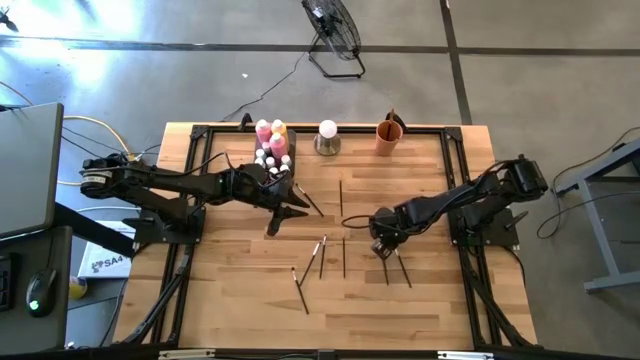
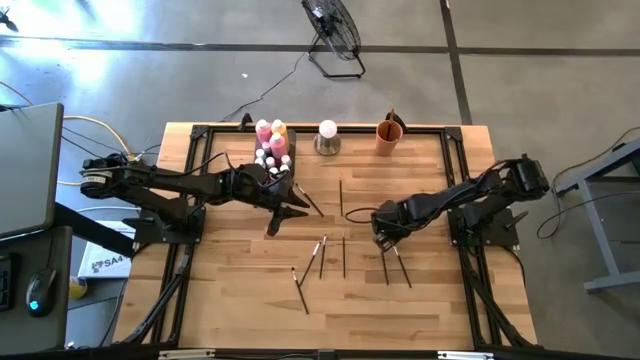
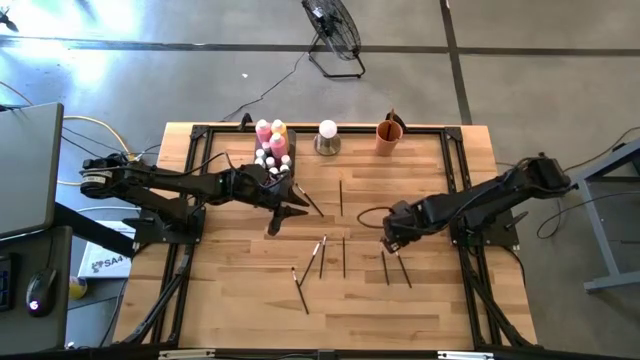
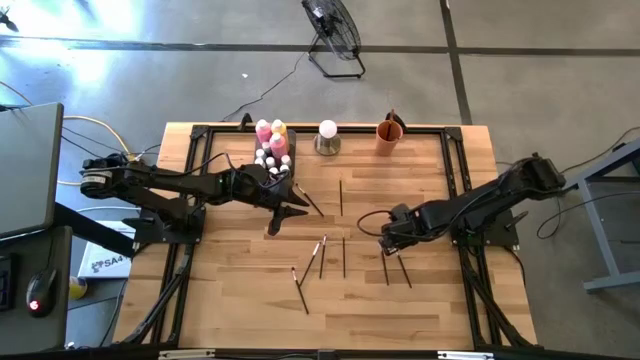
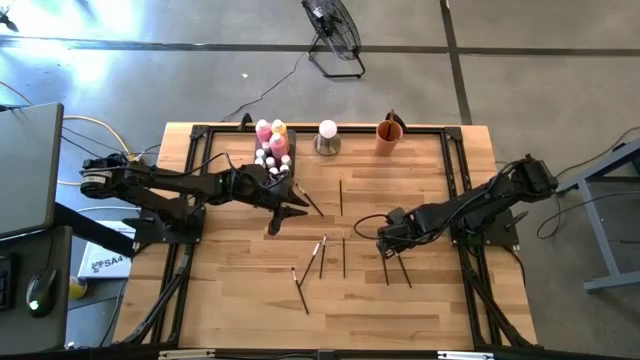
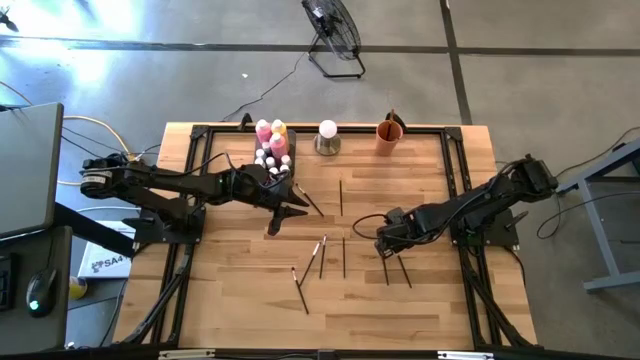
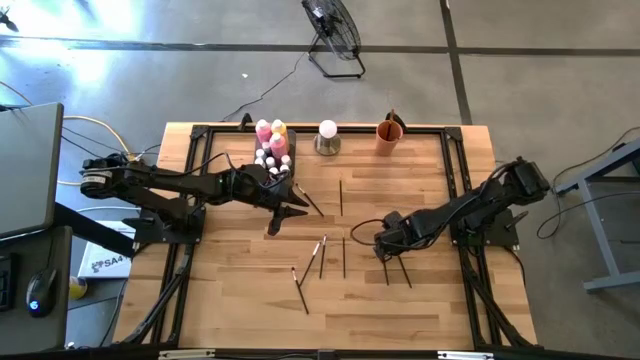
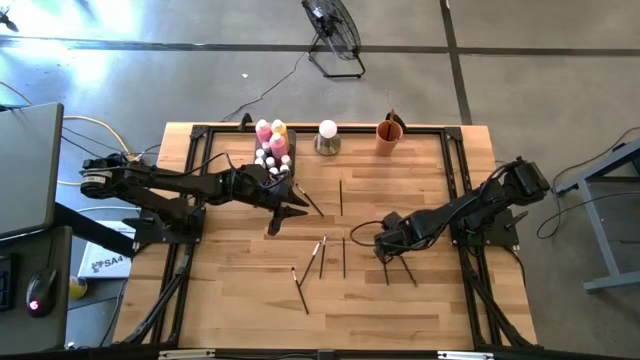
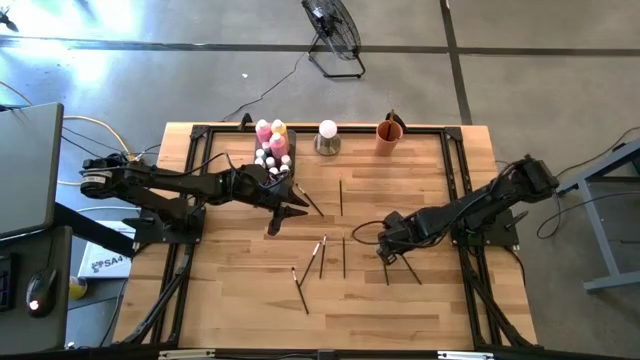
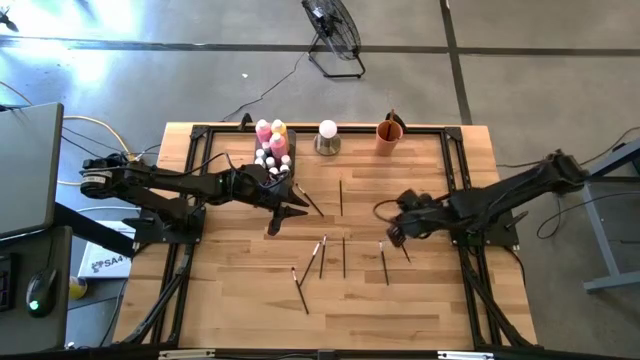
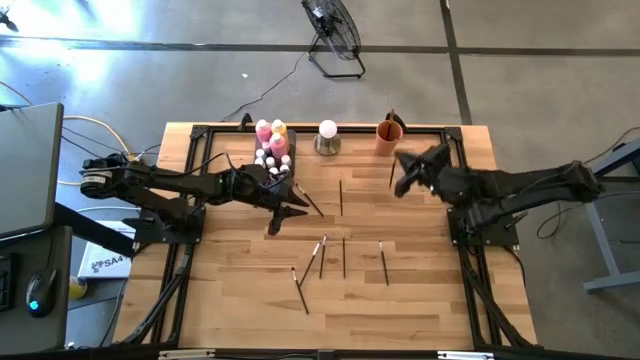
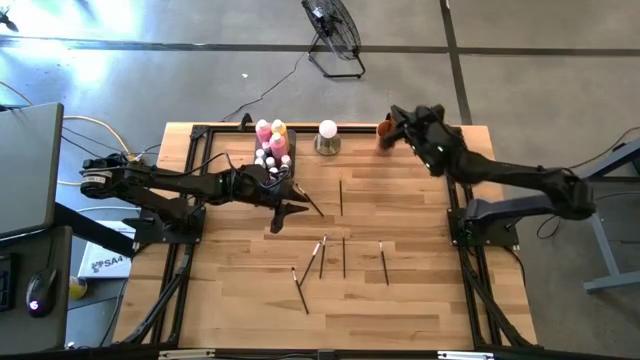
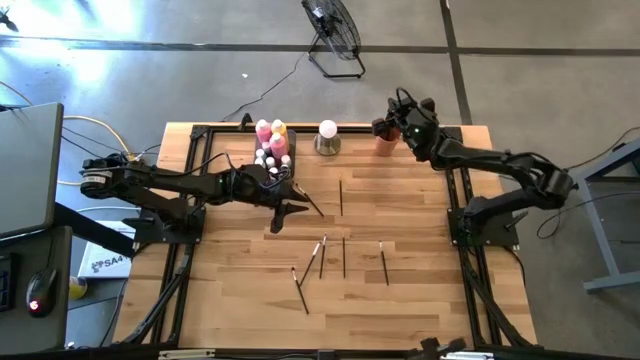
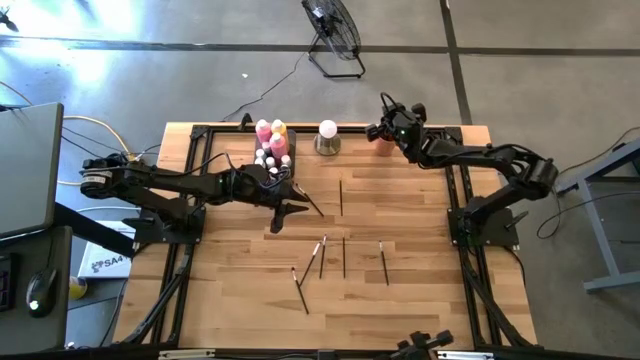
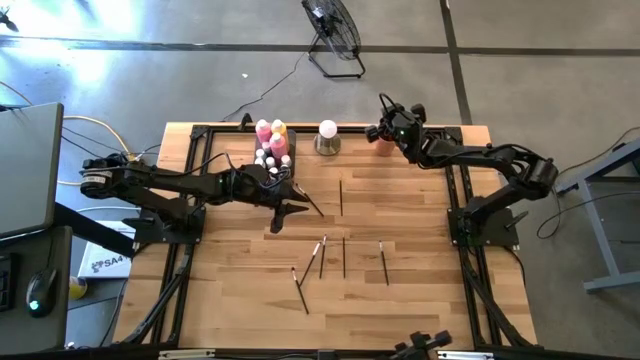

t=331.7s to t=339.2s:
Task: Pick & Place Paint Supplies
Put the silver paintbrush into the orange cup

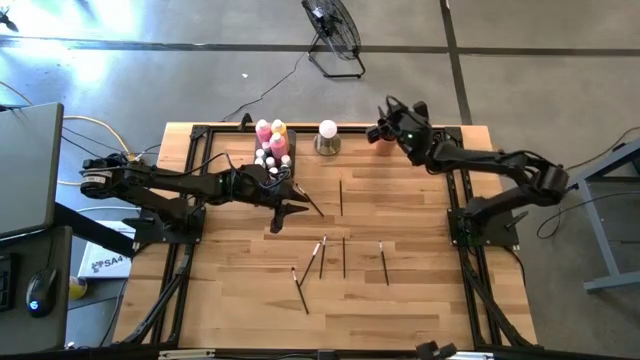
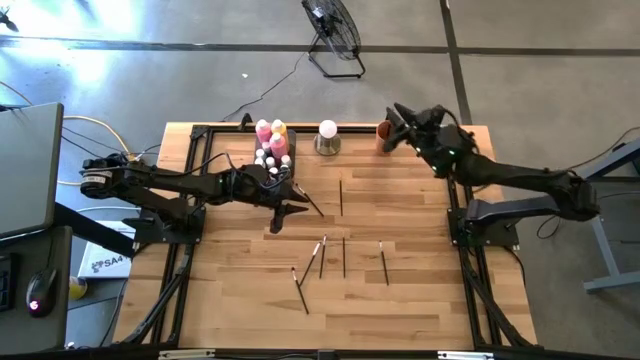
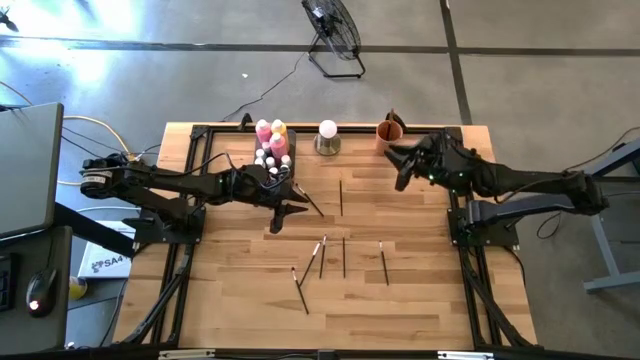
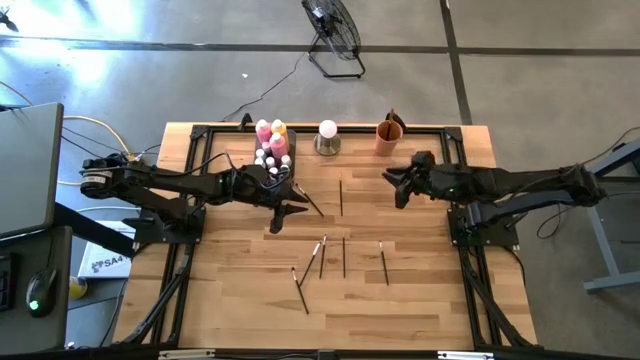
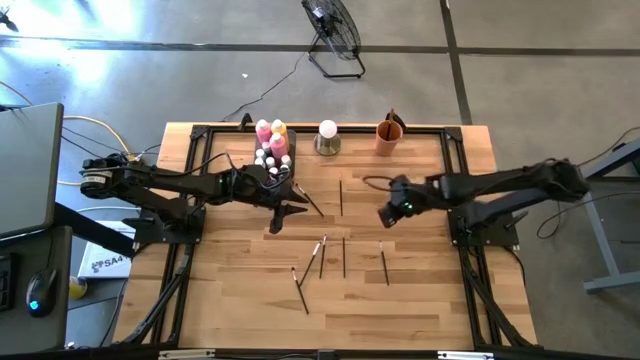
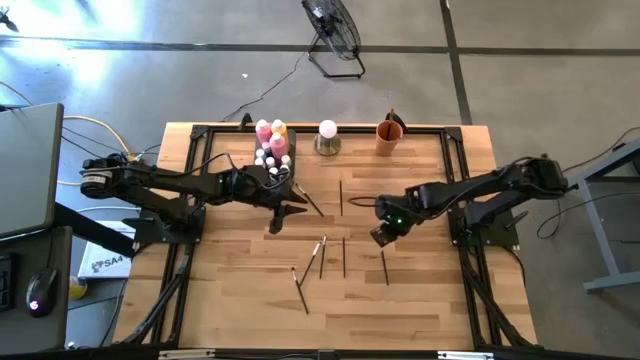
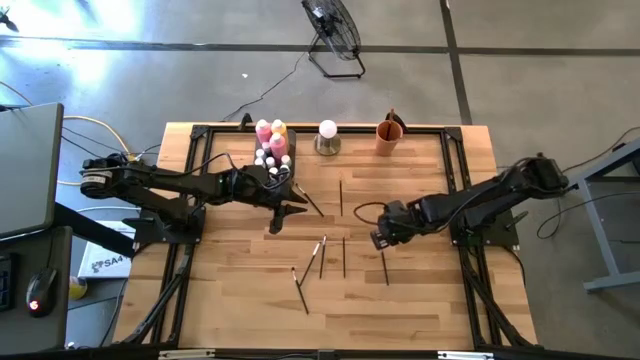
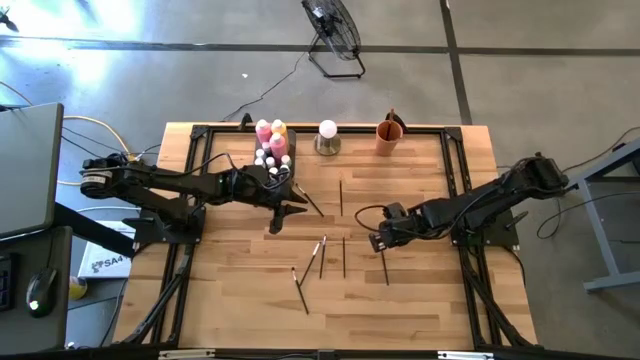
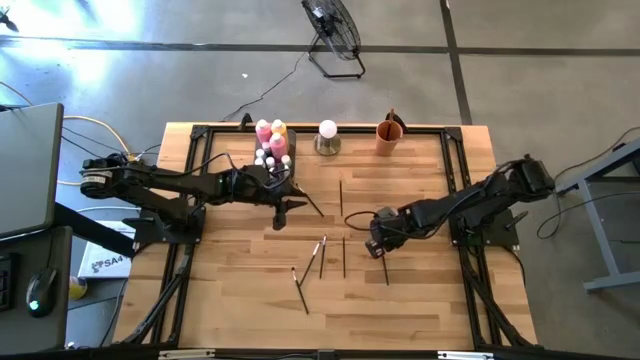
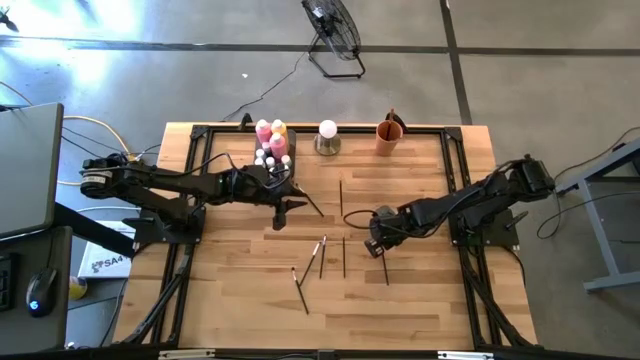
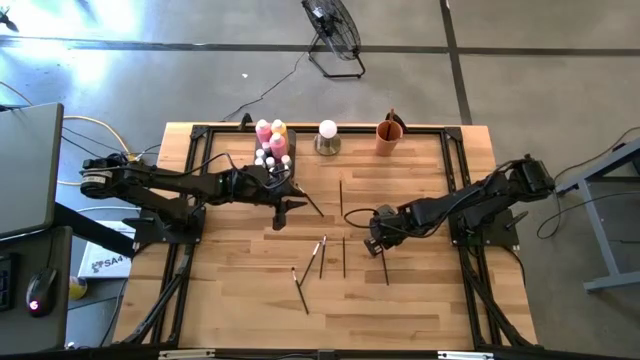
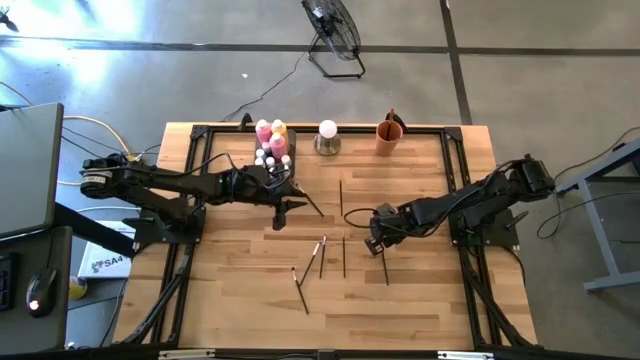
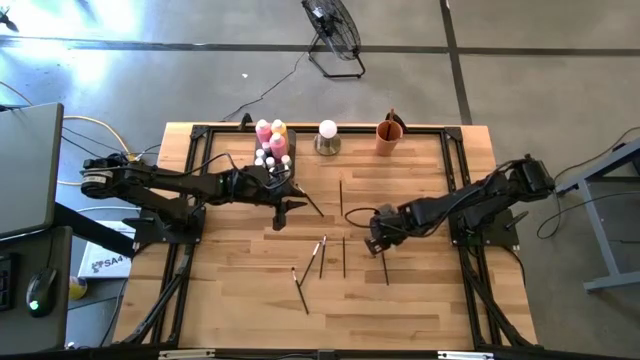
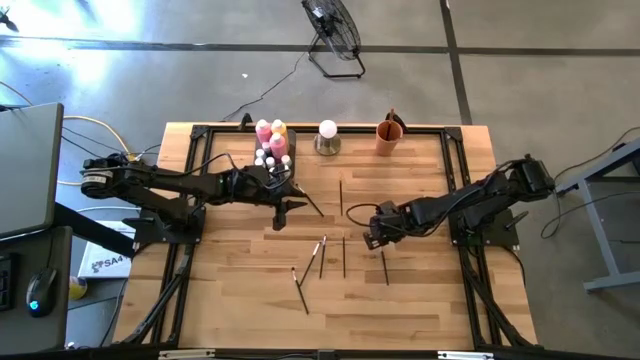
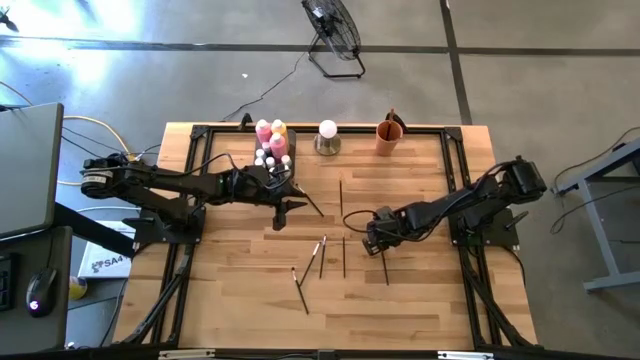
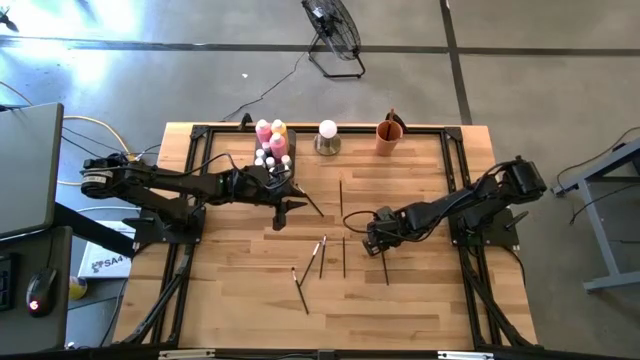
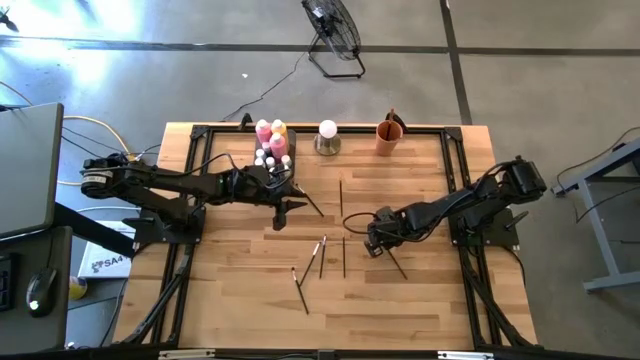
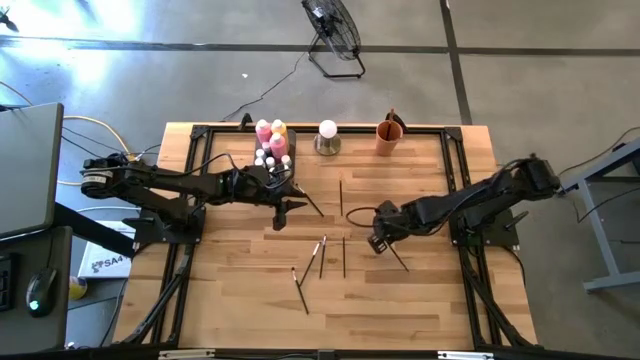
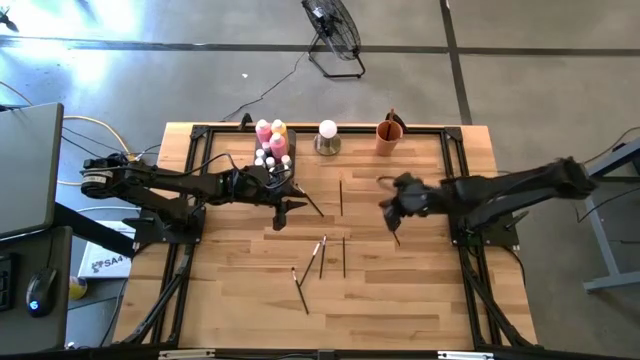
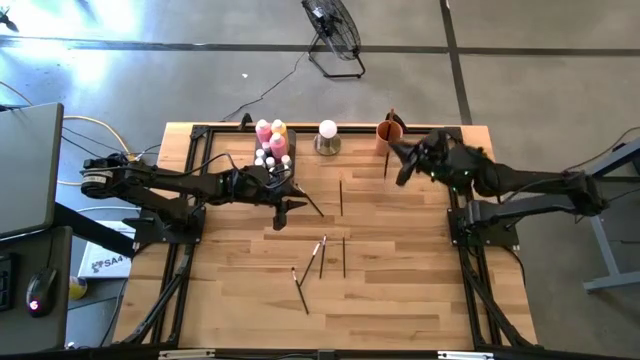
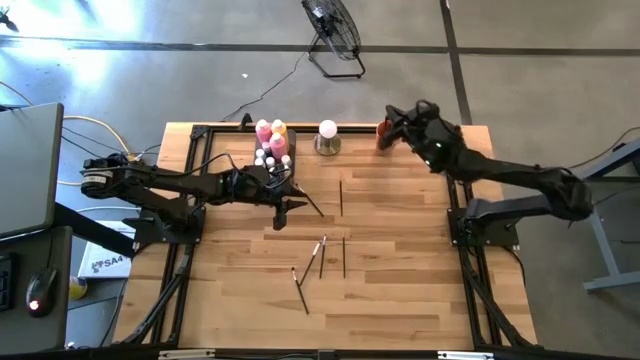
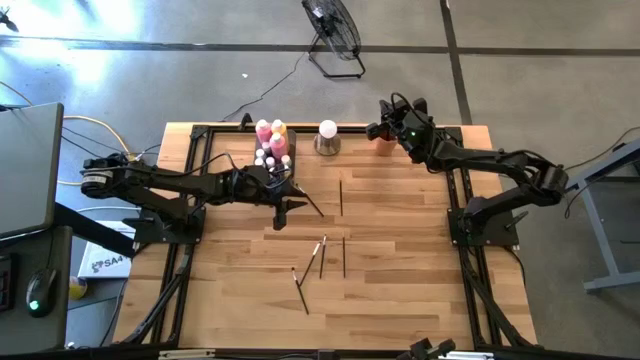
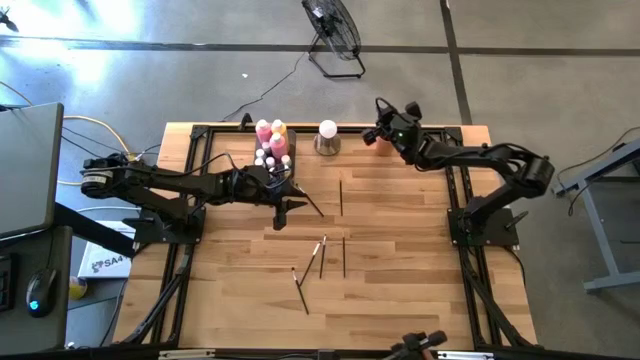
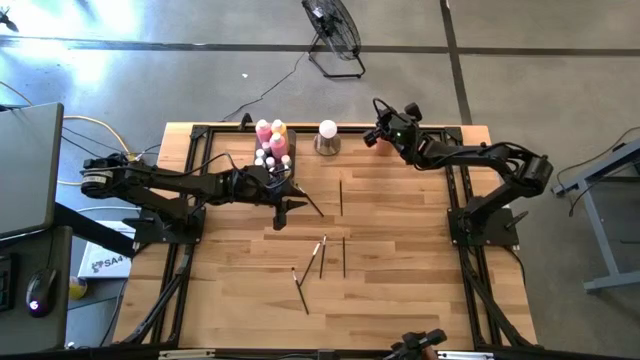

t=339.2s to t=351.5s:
Put the silver paintbrush into the orange cup

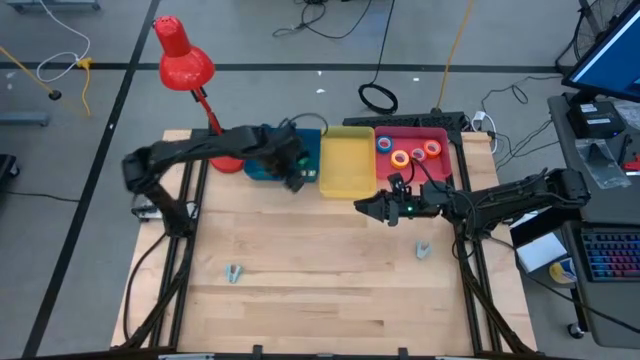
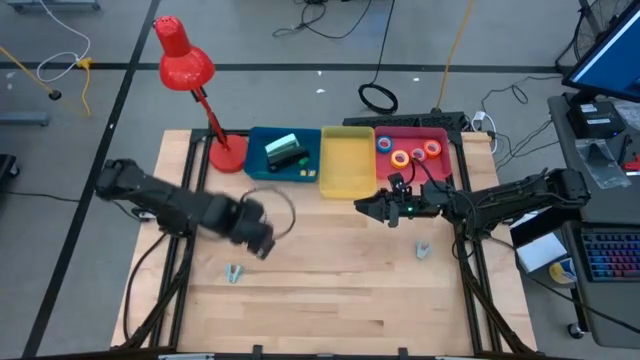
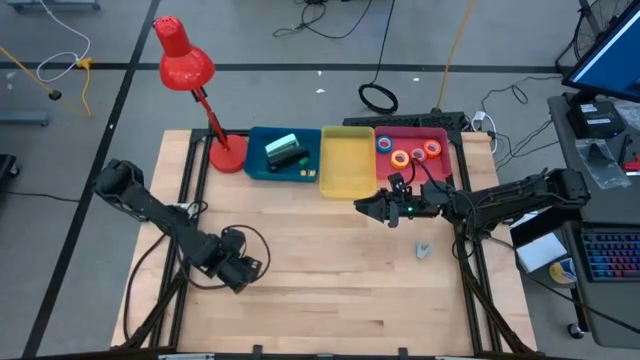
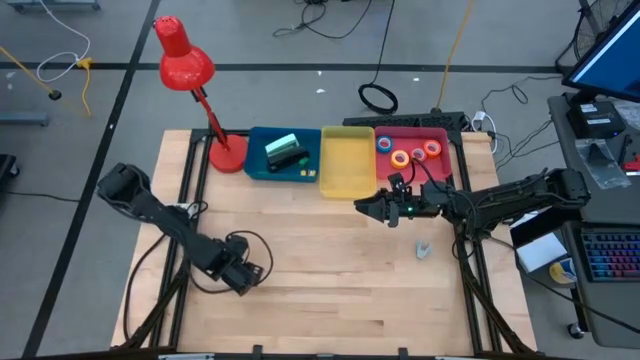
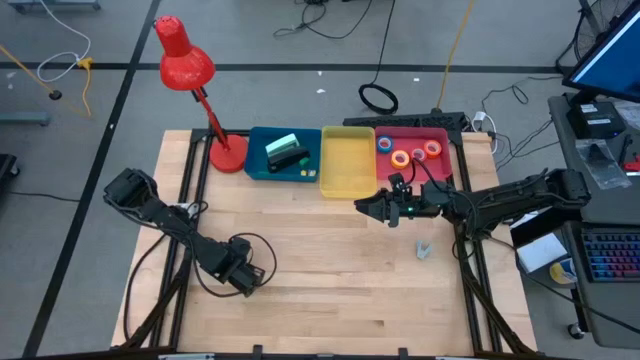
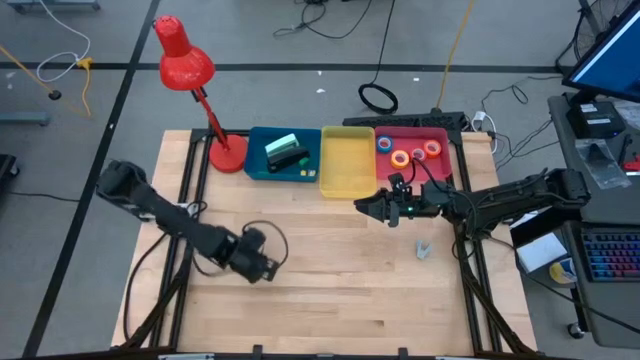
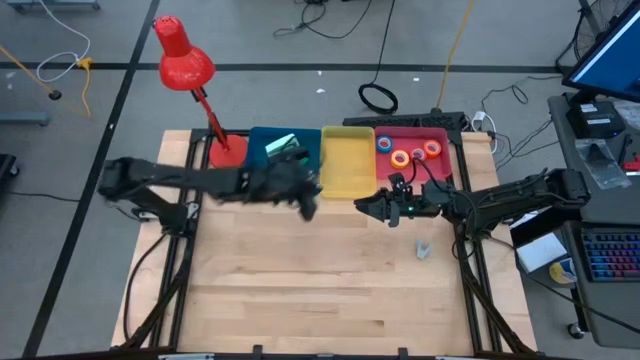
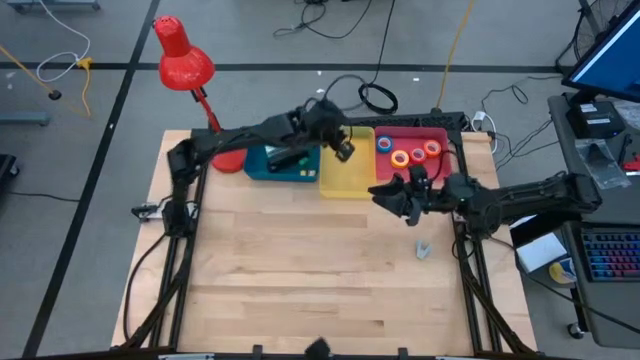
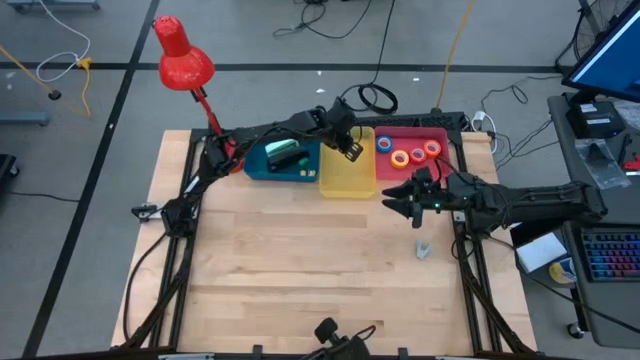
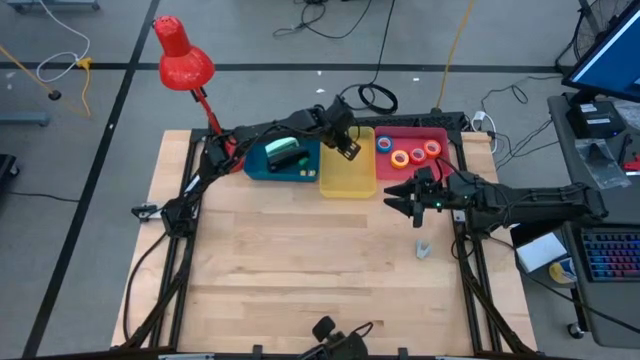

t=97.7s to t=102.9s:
Task: Pick and place Stapler, Stapler remover, tape
Put the left light blue staple remover into the yellow bin
